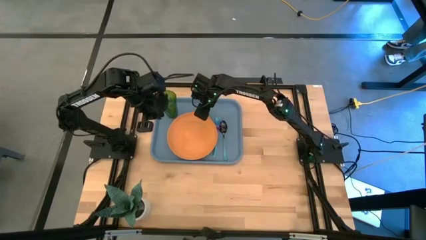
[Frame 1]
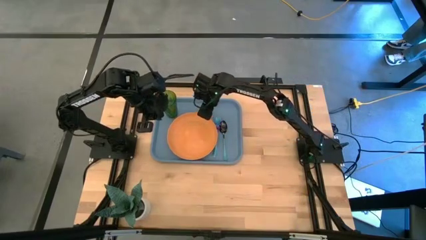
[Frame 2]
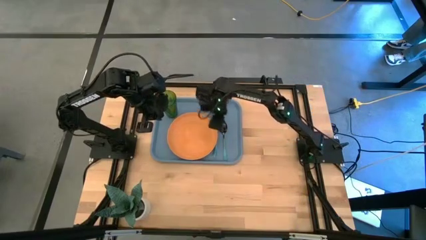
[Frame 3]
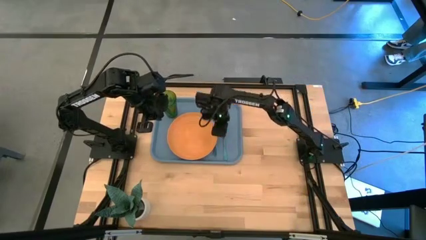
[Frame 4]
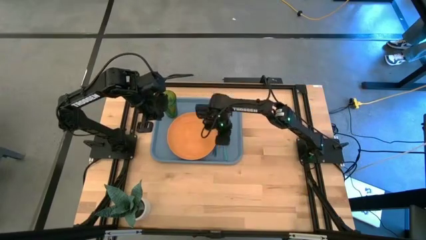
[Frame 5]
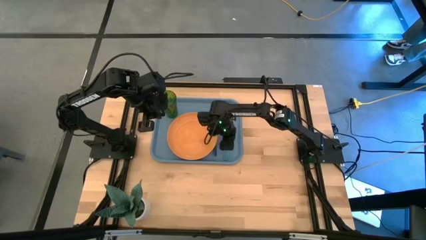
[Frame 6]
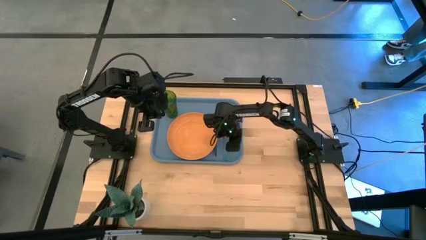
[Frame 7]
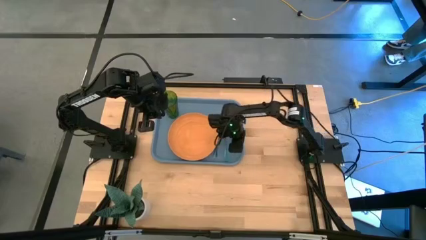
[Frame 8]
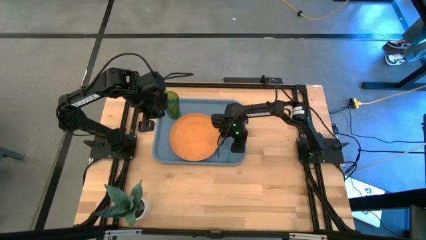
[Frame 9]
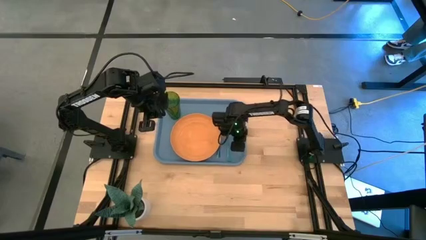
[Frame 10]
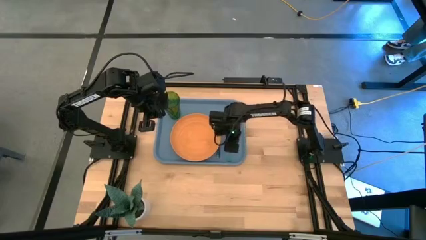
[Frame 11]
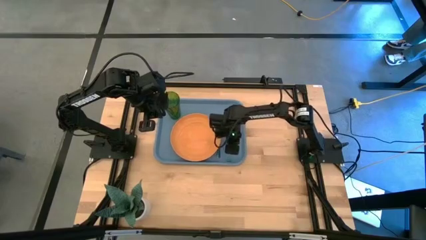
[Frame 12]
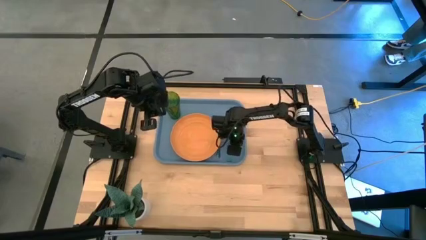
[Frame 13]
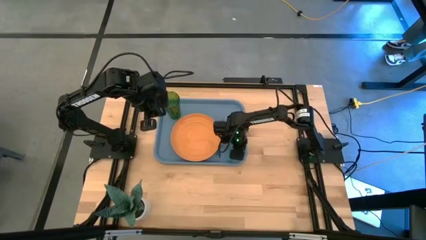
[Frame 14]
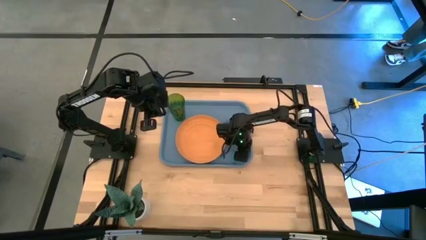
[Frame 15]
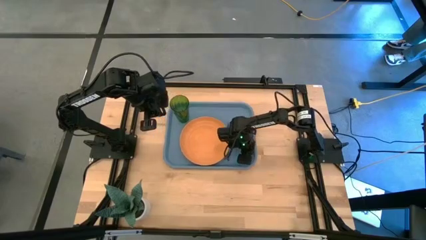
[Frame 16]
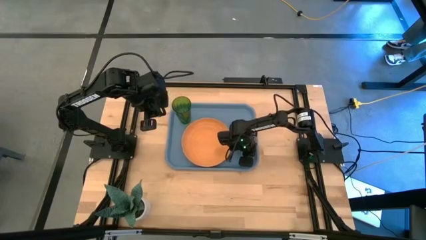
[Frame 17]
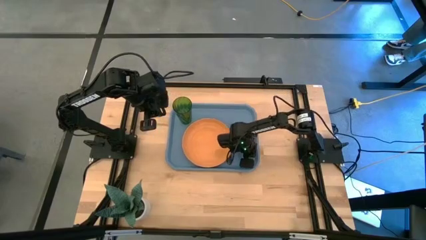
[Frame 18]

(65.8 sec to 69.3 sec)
Task: Pick and place plate/cup/fork/spoon on tray
Adjust the blue tray

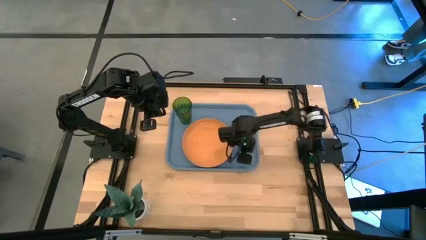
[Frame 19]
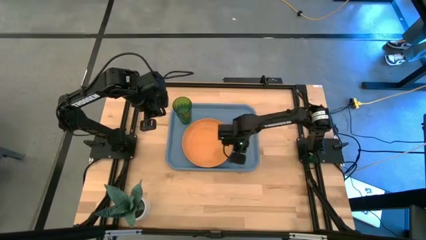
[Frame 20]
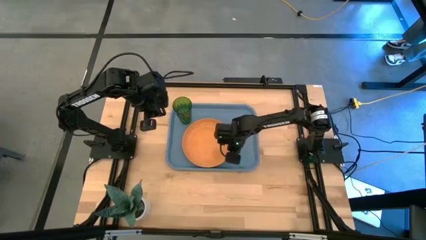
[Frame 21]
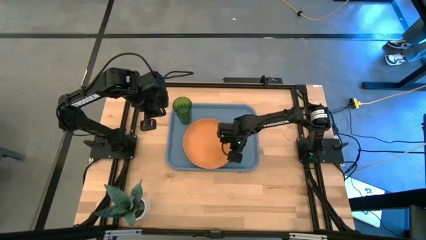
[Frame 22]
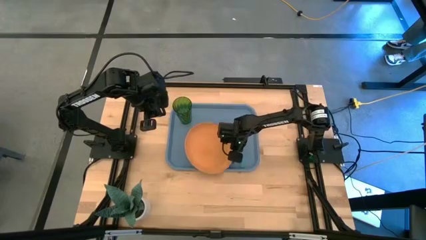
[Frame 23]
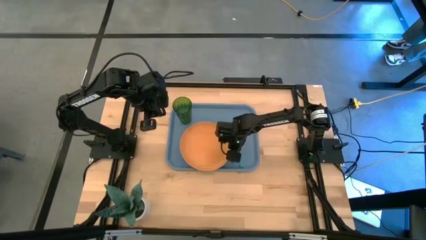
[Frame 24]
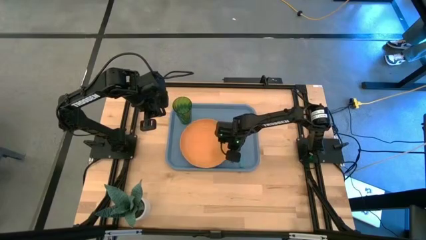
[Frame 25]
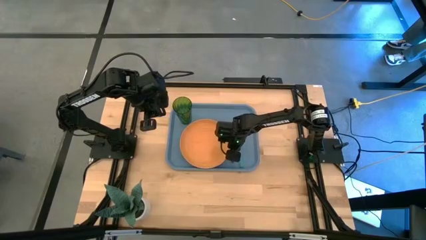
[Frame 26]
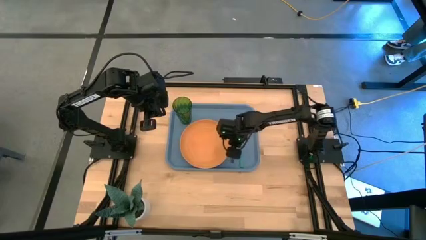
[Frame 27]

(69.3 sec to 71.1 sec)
Adjust the orange plate

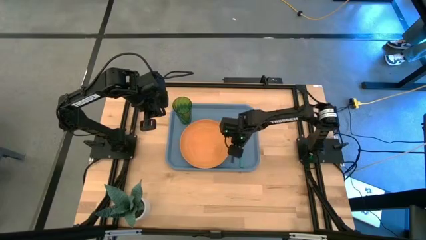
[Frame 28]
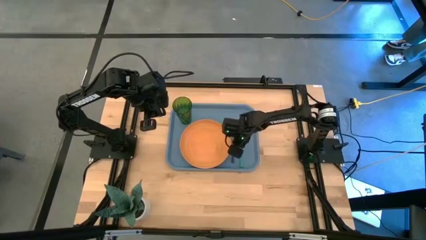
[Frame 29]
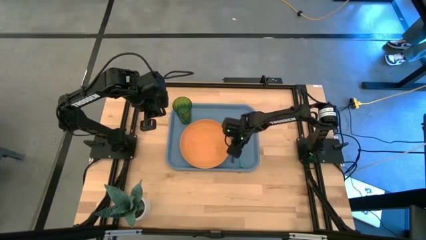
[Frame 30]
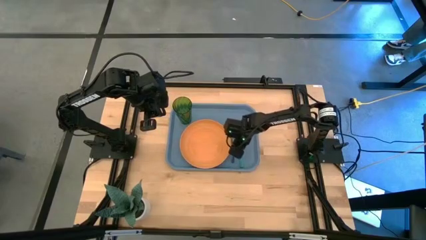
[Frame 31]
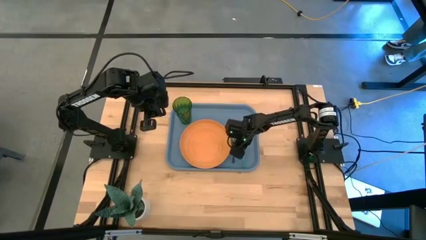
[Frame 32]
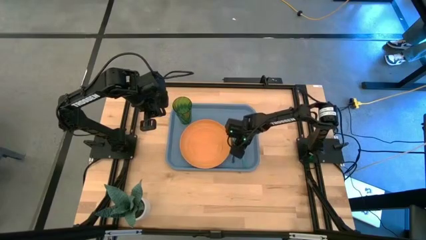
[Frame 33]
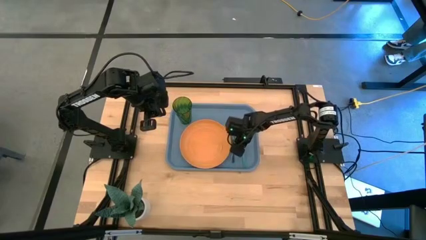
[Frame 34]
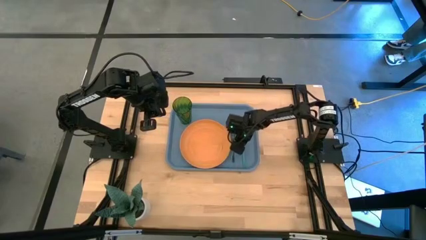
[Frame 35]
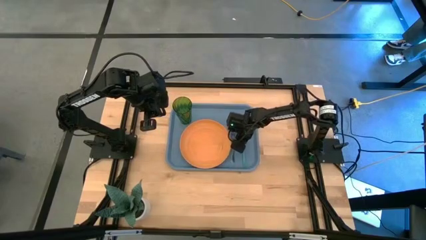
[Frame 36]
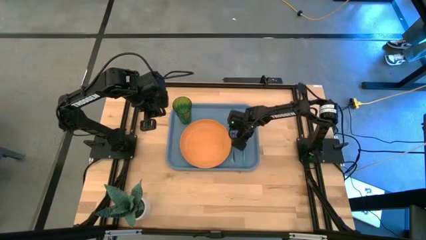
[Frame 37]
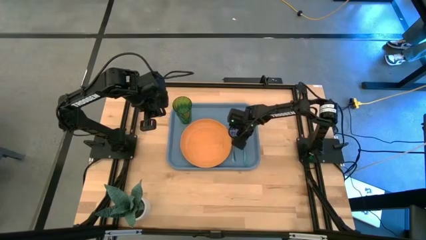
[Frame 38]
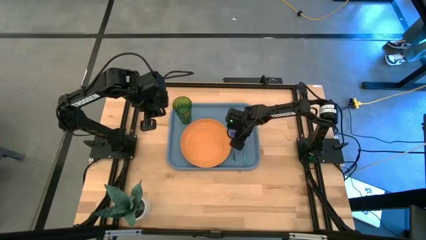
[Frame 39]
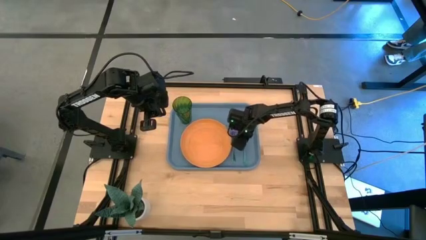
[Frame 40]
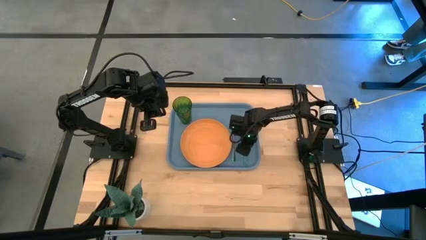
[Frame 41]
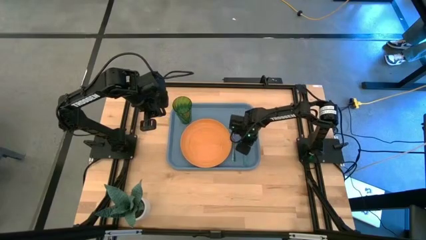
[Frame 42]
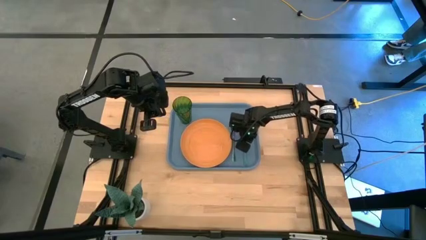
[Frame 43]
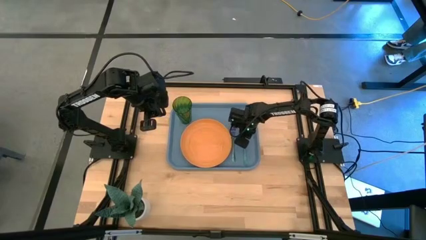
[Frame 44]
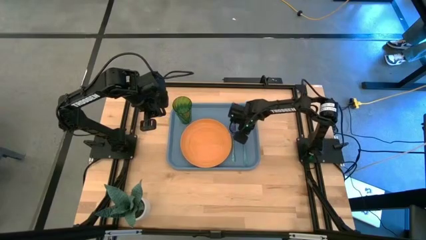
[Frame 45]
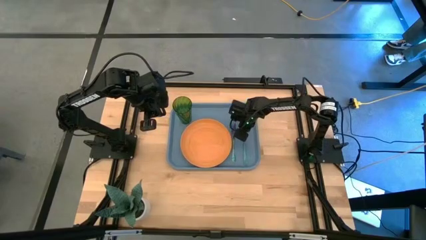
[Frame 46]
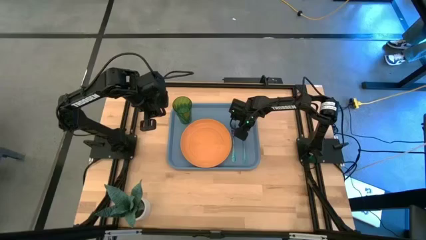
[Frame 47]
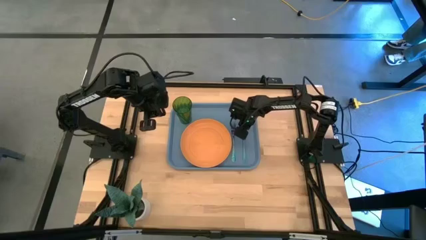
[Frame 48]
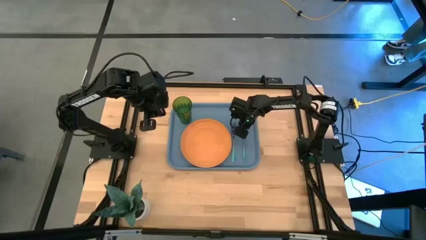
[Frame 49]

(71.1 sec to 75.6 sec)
Adjust the blue spoon

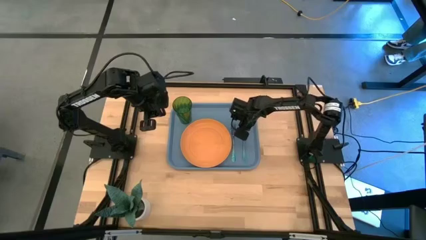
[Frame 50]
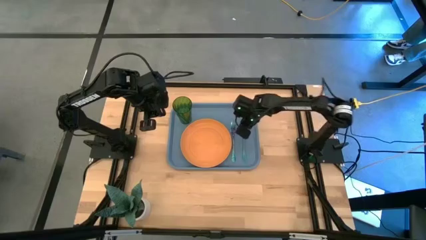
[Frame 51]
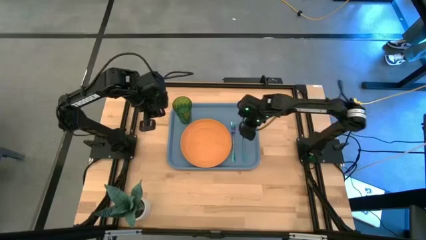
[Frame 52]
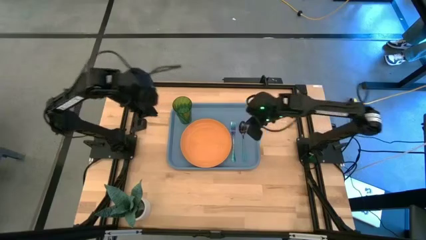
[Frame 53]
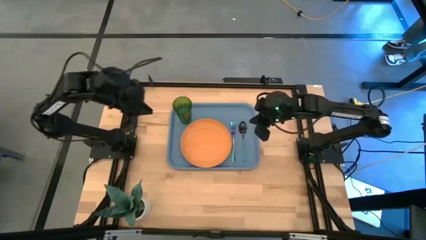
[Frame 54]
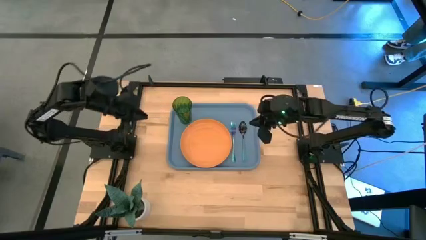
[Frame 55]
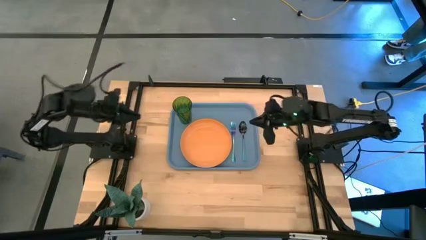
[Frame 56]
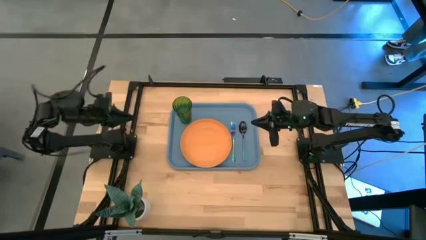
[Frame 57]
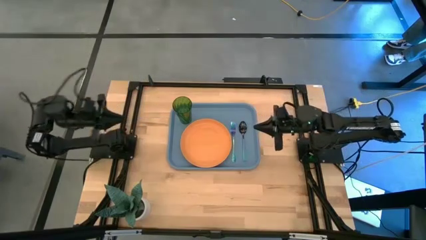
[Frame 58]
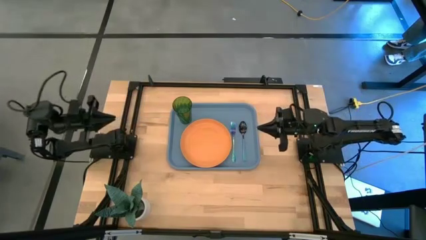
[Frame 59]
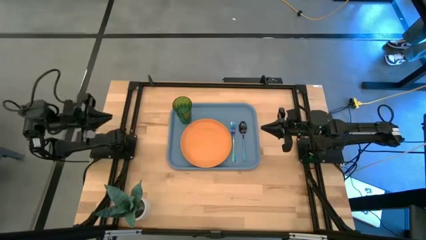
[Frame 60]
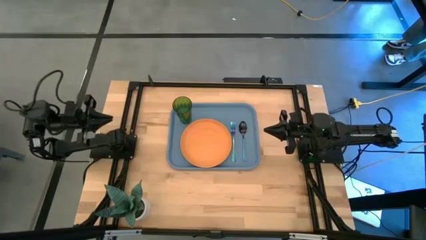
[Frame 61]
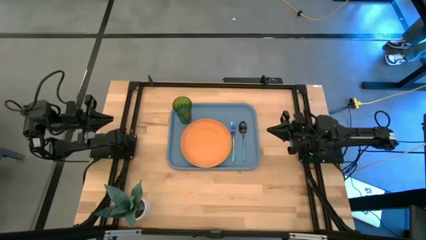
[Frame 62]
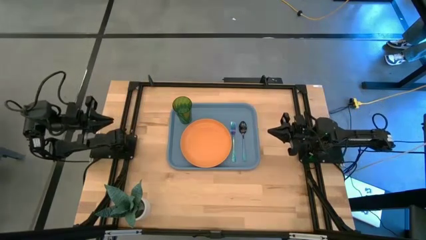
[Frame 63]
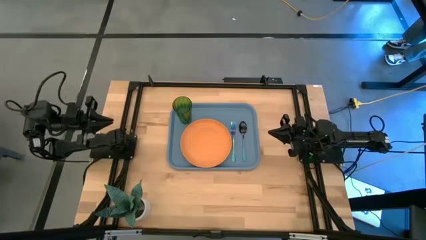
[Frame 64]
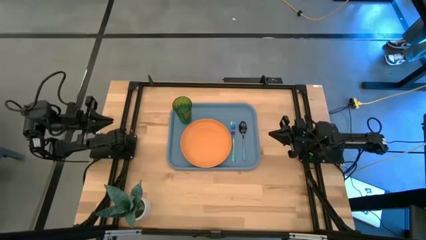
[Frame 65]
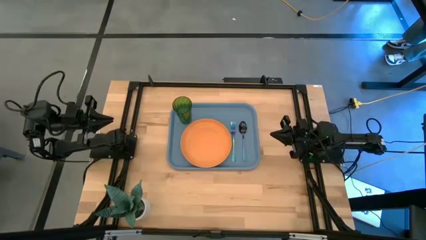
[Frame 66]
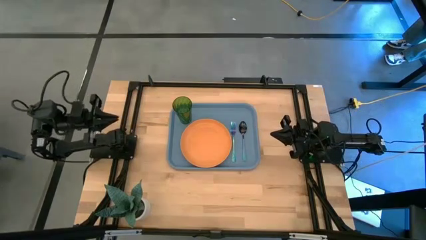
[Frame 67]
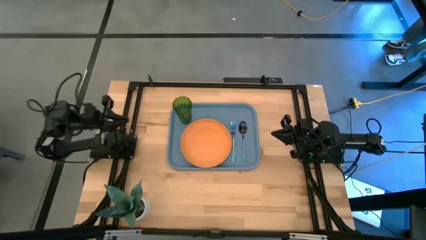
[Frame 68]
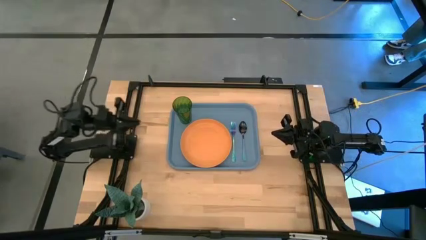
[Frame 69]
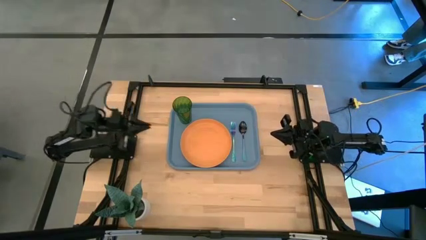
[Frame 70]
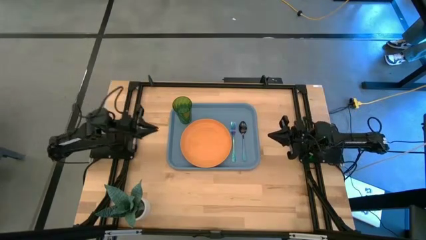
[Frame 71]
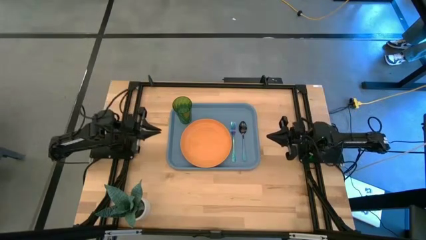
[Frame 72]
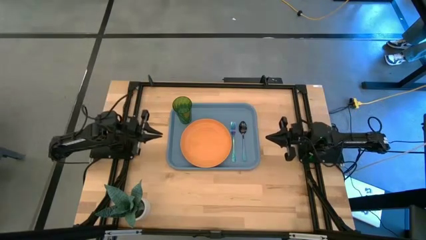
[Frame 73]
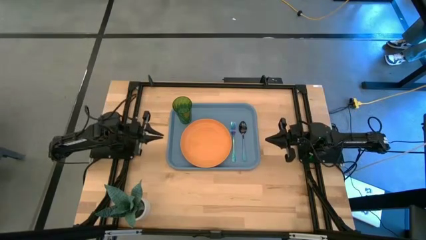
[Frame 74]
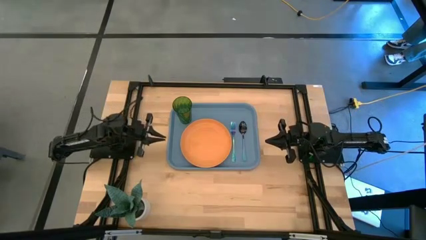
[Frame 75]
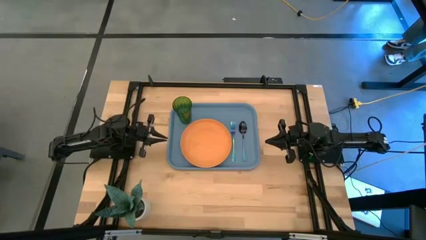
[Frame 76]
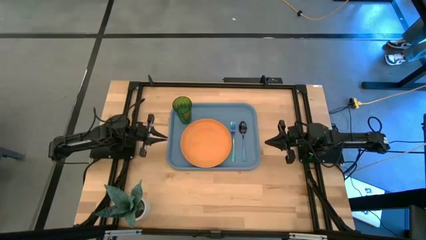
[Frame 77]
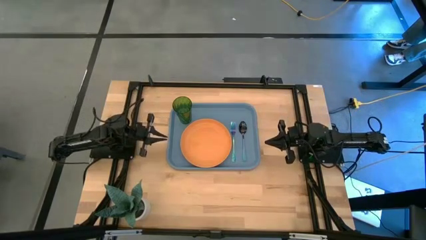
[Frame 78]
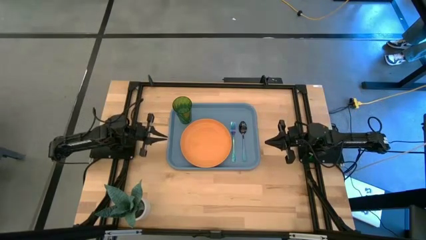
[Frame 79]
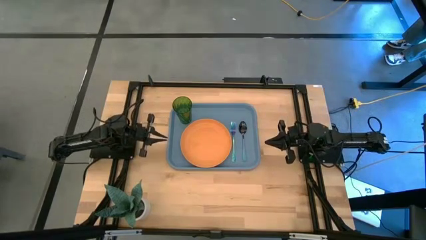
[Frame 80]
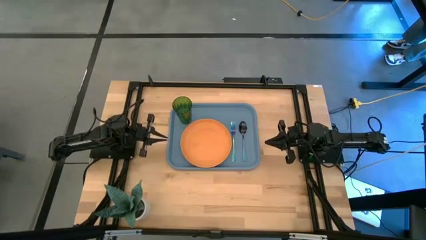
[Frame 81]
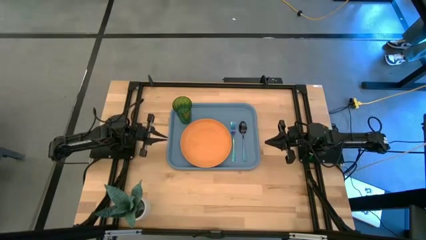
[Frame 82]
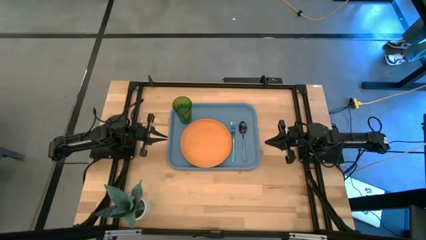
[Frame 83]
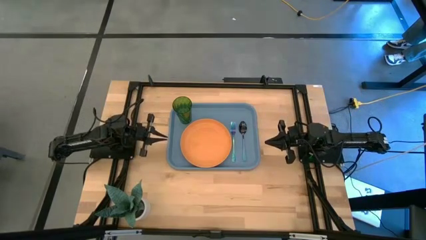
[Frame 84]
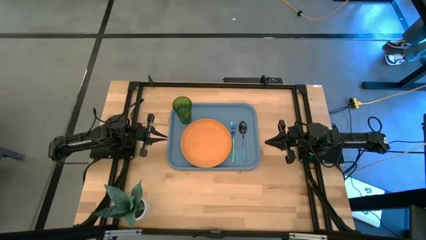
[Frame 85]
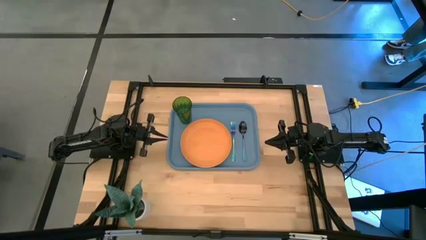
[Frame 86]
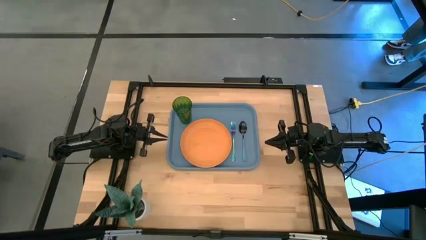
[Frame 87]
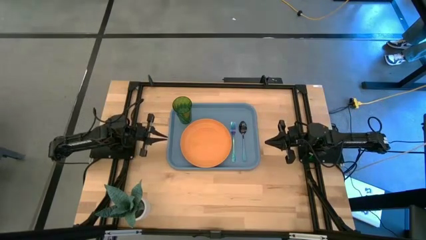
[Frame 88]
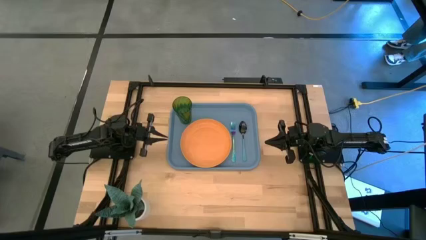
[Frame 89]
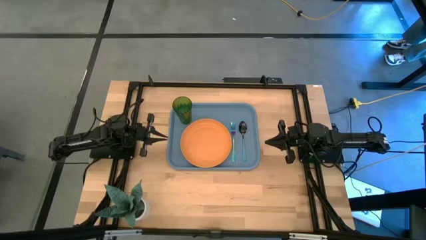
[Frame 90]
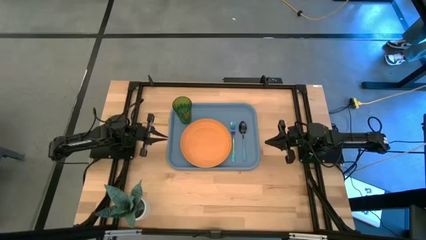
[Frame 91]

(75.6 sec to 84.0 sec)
Return to Home Position
